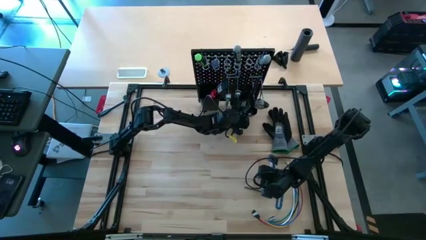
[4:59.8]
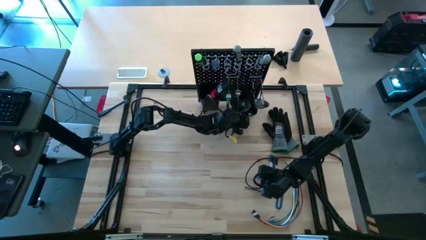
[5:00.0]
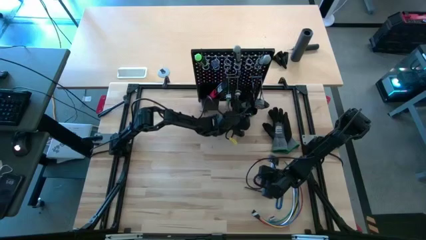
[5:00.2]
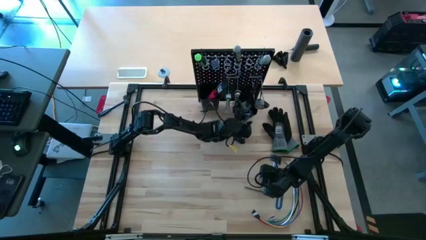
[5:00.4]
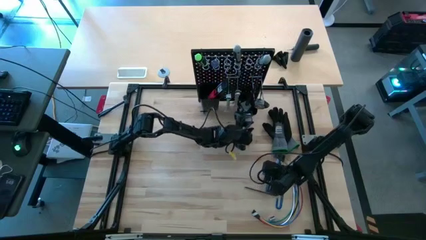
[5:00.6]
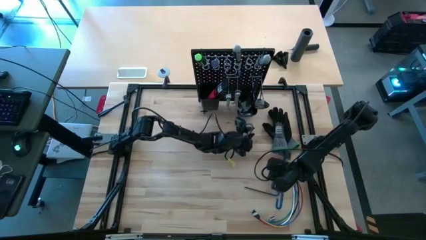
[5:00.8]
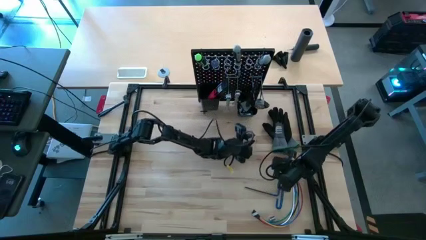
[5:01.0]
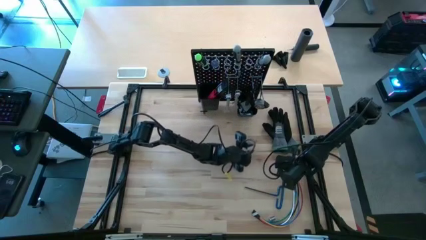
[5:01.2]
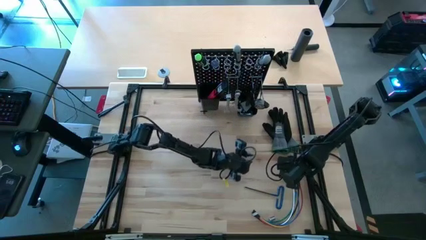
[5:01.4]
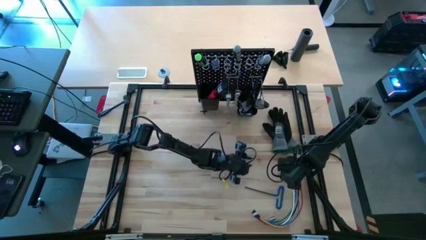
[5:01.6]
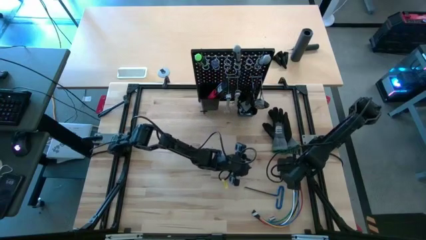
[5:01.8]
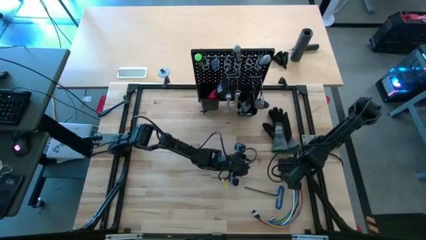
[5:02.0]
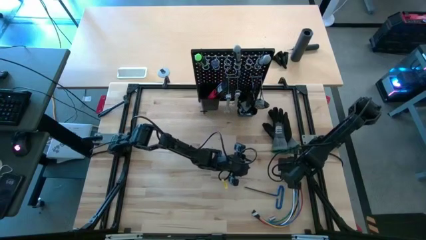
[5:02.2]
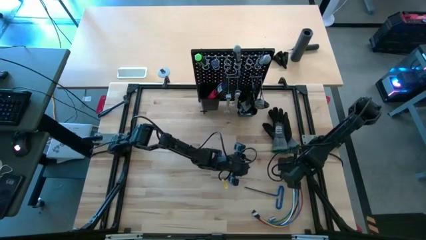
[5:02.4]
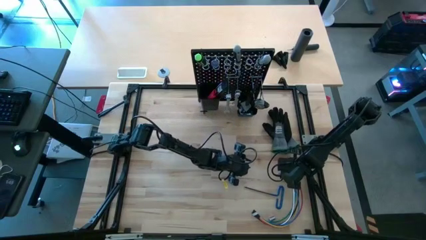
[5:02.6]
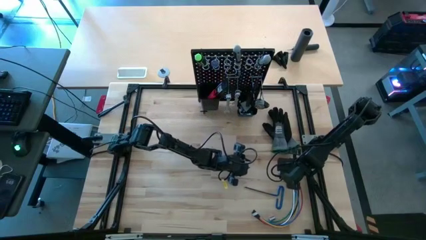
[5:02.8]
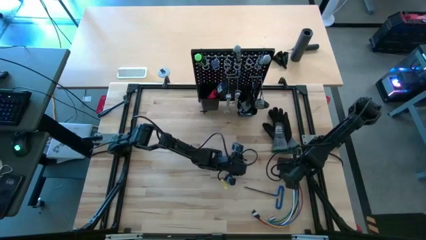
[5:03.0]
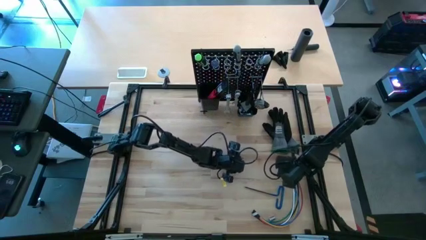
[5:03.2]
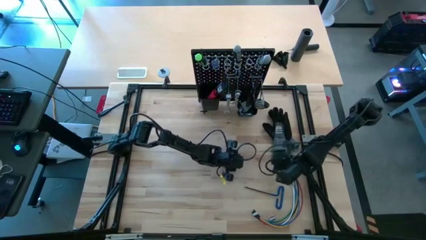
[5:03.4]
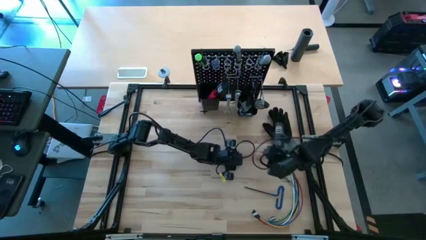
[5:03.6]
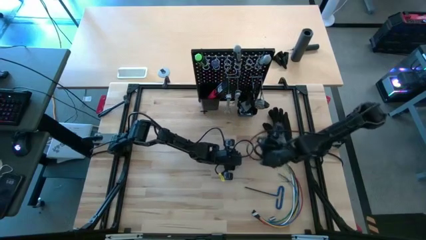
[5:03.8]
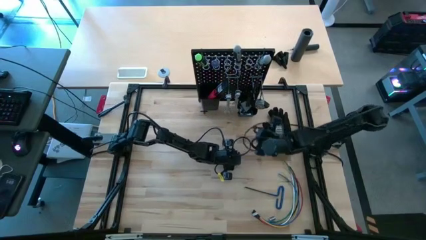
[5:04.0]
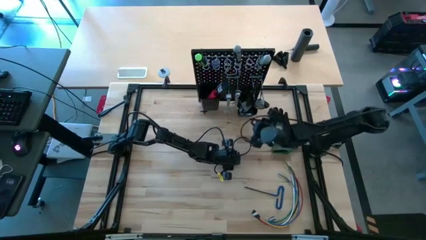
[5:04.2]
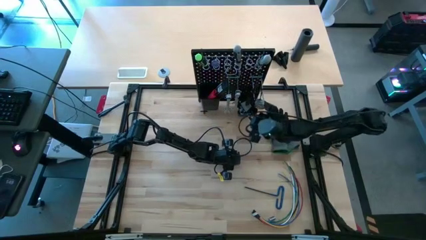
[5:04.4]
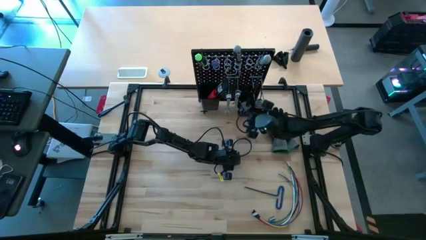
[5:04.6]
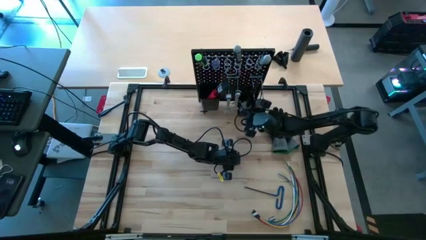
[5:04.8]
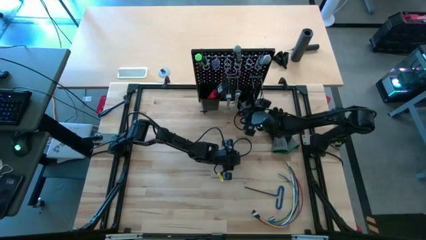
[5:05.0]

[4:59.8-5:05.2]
Task: Hang tools onto peg board
Put the silver socket on the right black bin on the peg board

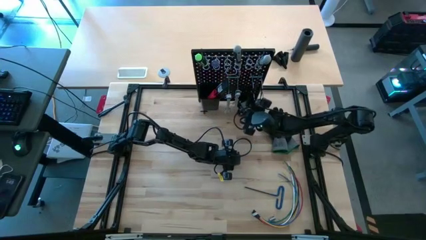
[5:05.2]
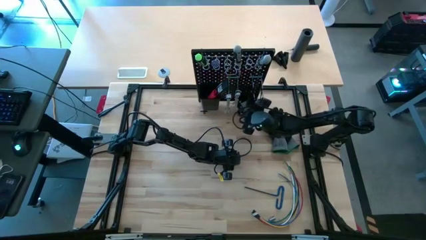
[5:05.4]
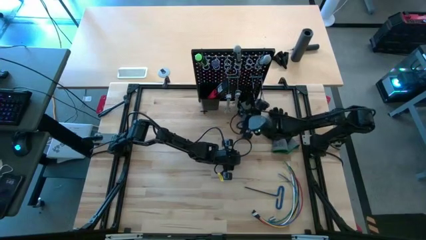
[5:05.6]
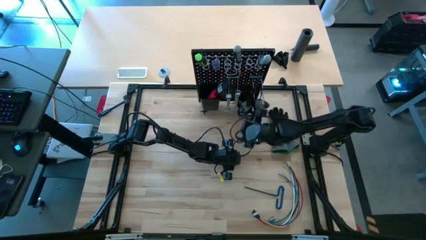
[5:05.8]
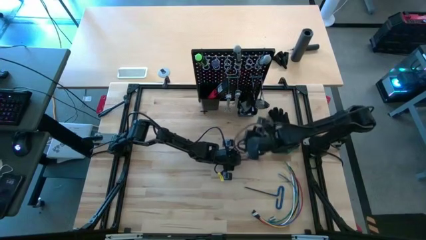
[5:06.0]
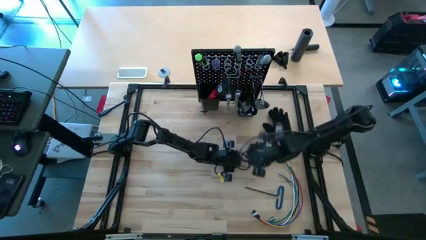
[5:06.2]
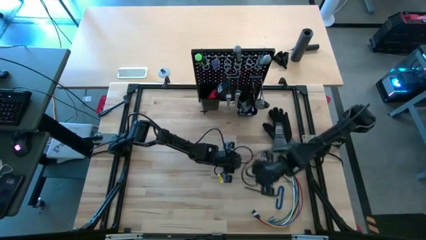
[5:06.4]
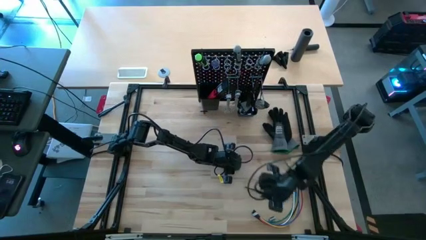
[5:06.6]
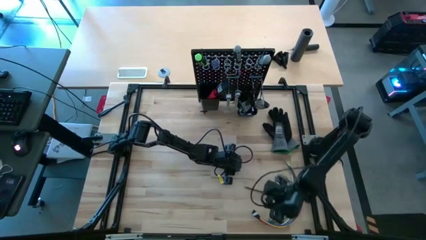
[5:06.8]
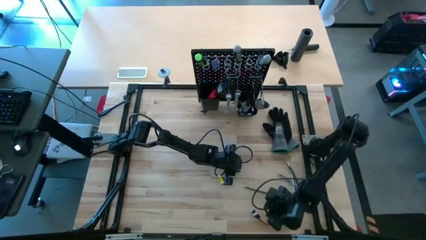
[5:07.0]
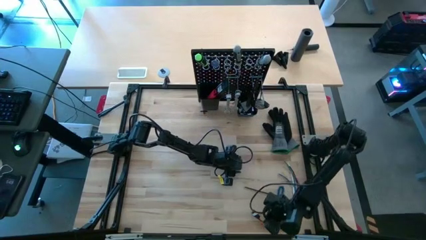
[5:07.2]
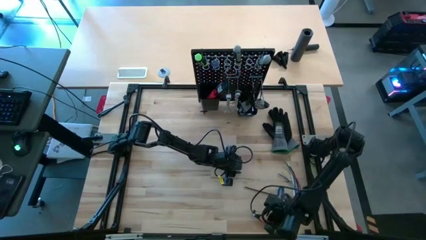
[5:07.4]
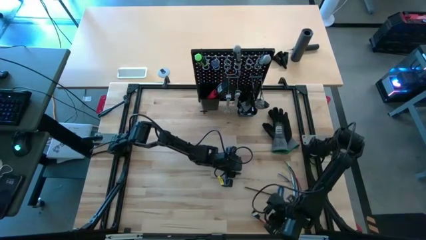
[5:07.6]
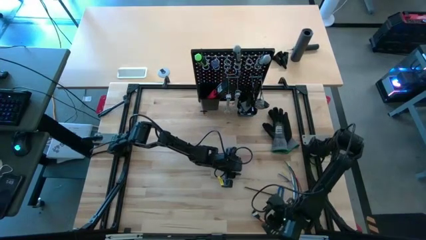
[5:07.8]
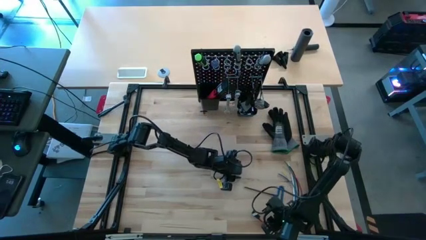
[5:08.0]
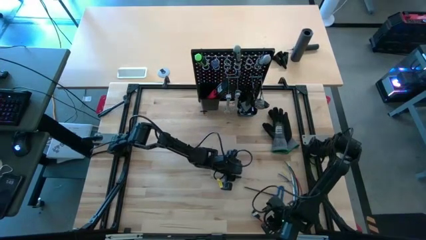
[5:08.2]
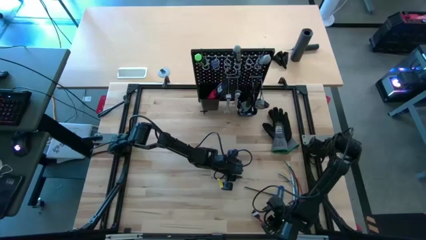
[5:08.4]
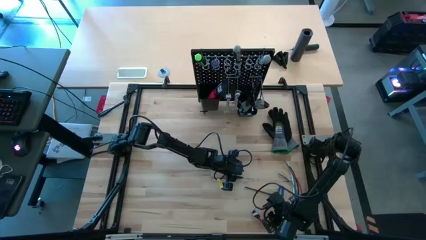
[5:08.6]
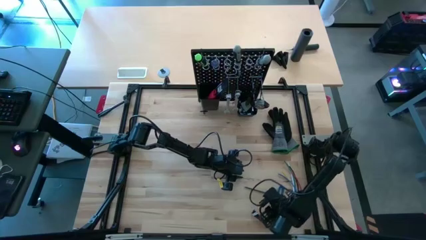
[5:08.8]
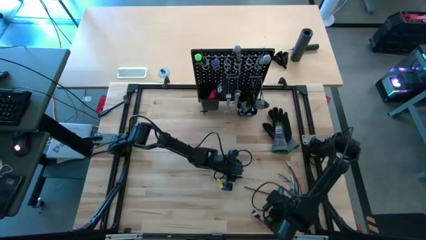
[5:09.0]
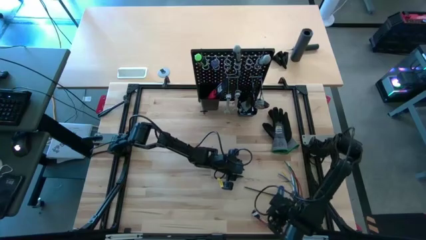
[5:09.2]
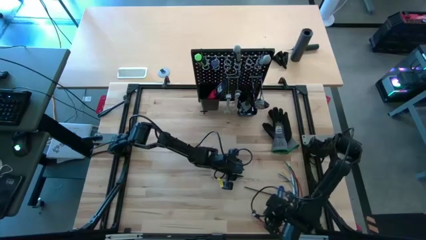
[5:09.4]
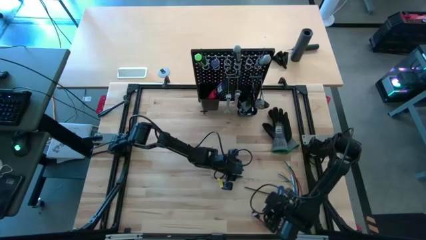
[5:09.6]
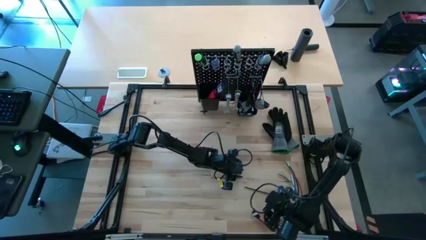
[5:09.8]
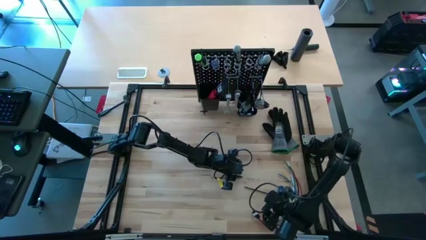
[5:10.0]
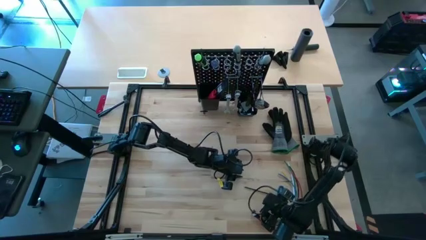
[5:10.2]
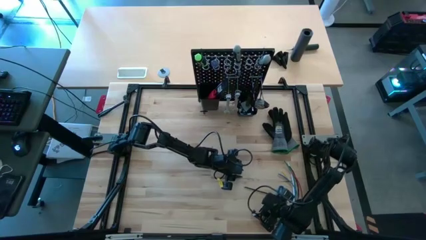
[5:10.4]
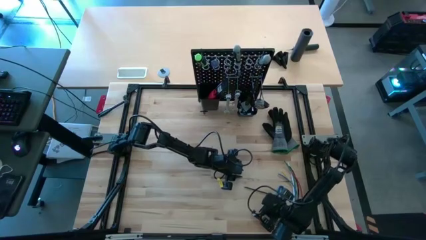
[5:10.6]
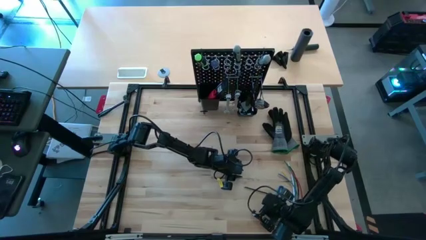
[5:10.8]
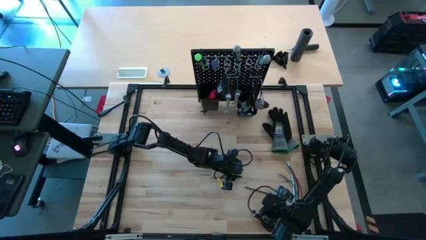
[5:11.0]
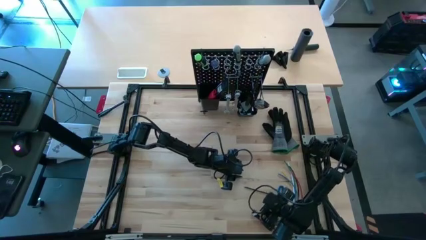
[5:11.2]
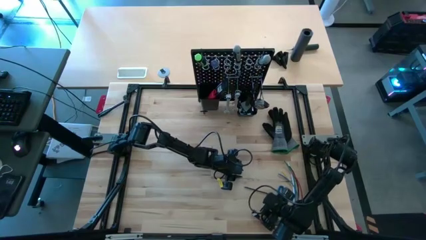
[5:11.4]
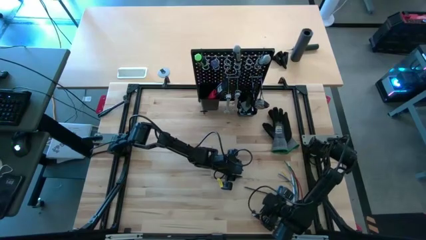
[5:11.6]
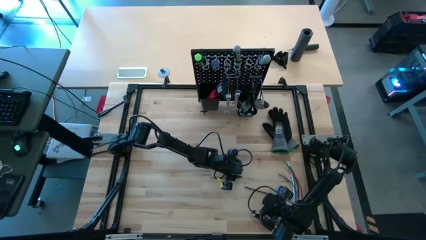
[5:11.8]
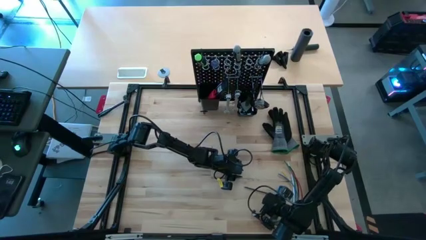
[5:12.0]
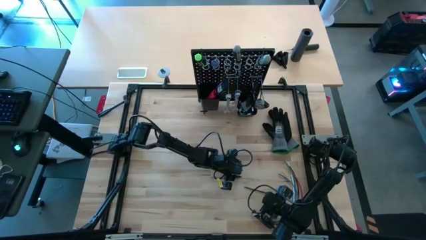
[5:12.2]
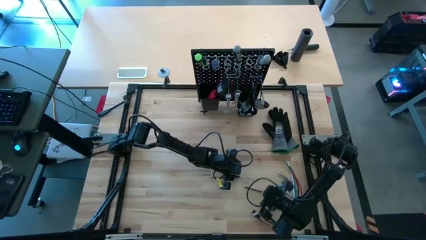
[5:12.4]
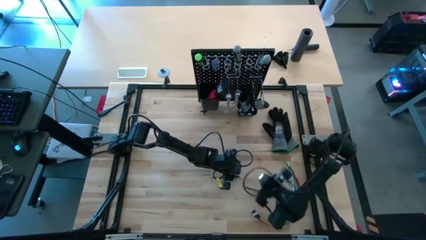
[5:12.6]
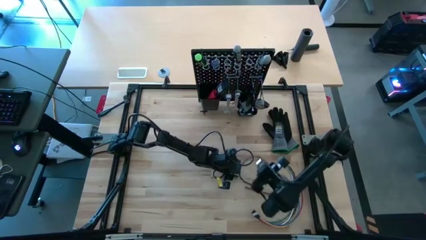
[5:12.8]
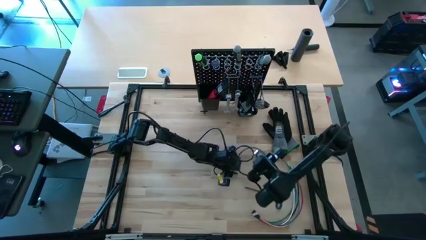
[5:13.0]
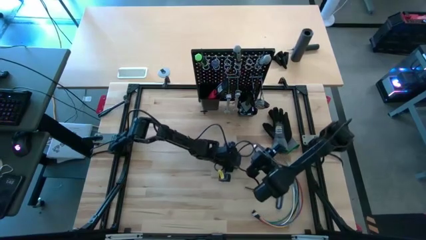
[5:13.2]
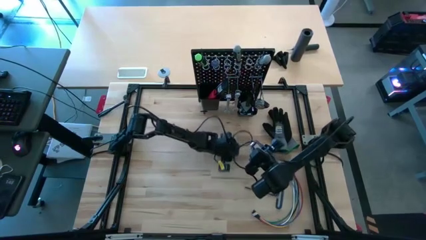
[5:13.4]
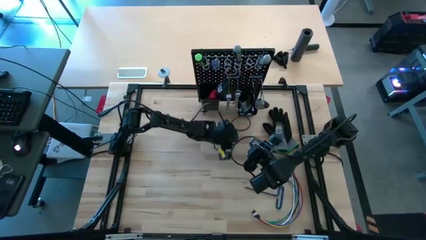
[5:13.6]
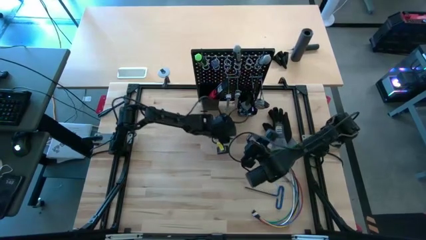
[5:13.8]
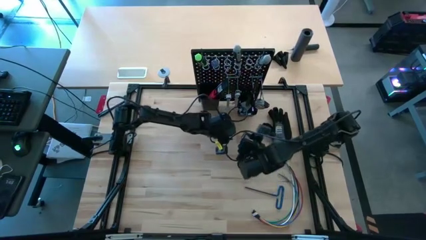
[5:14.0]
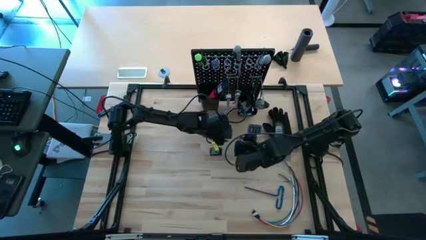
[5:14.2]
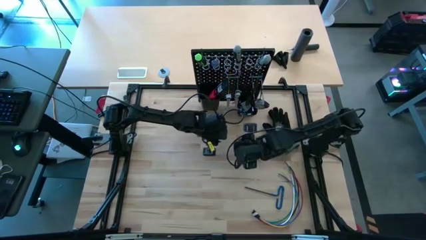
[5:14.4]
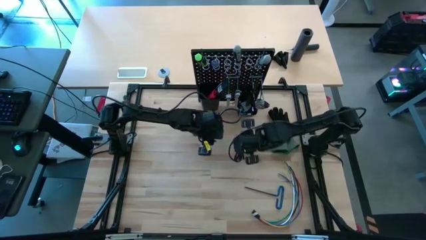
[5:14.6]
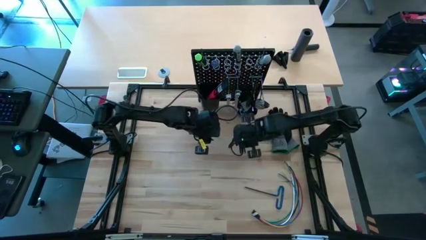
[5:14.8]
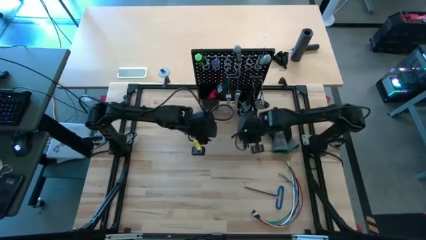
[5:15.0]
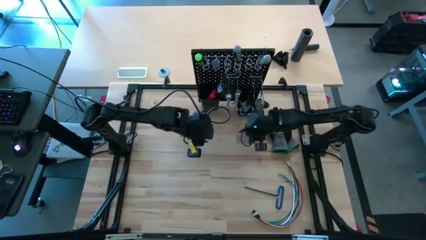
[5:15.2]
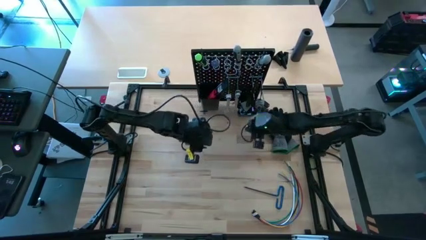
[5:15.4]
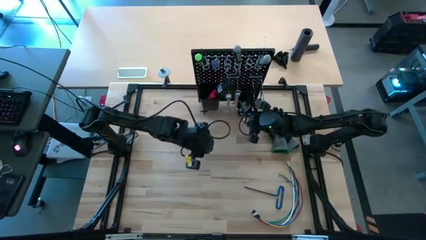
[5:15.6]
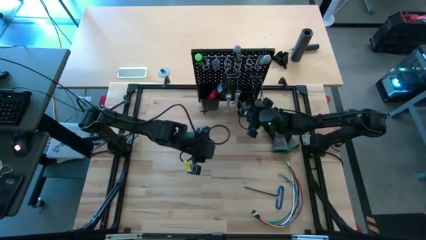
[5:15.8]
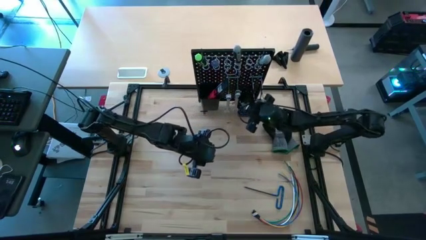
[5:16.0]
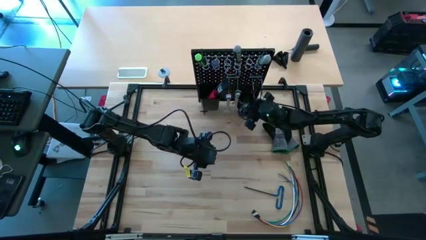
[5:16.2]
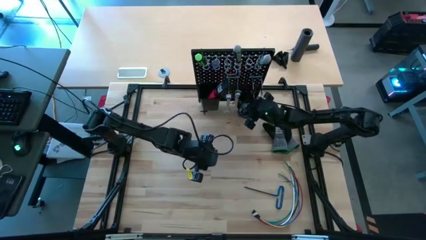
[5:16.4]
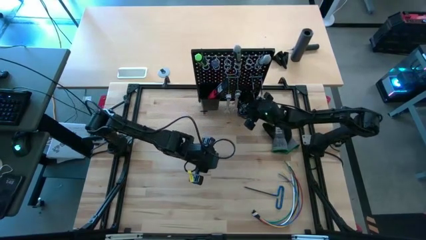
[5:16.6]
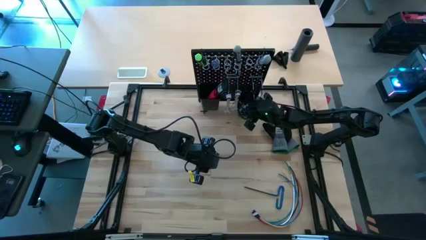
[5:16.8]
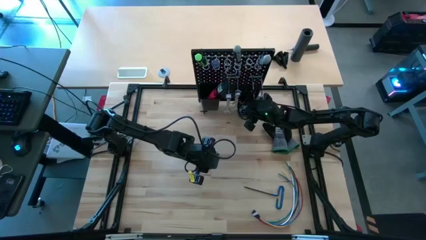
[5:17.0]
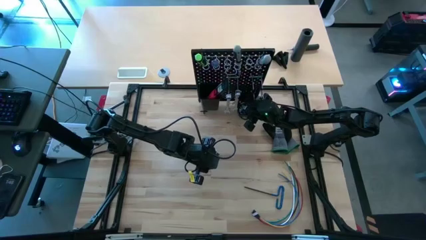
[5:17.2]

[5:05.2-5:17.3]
Put the silver socket on the right black bin on the peg board
